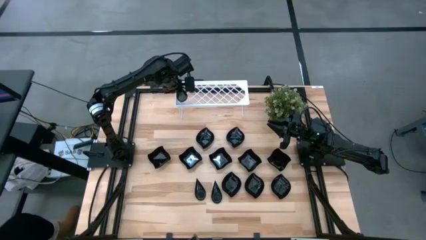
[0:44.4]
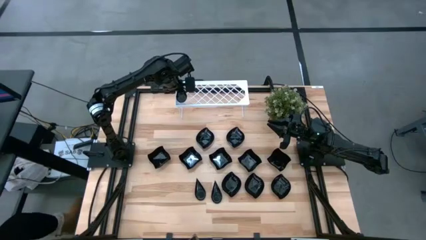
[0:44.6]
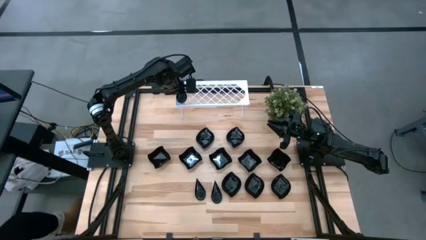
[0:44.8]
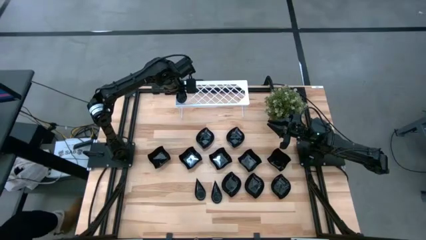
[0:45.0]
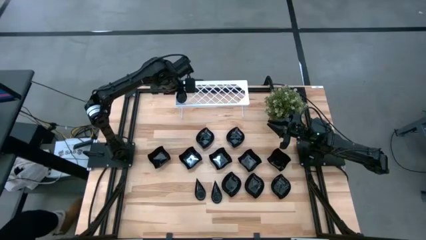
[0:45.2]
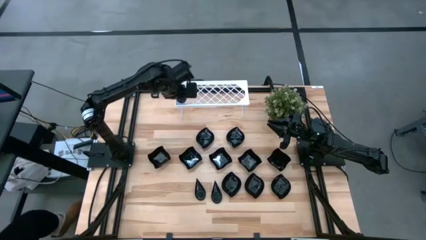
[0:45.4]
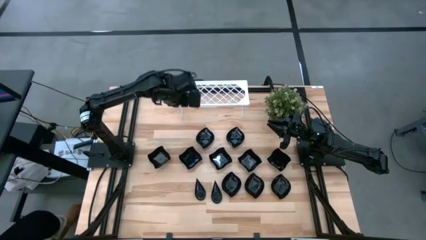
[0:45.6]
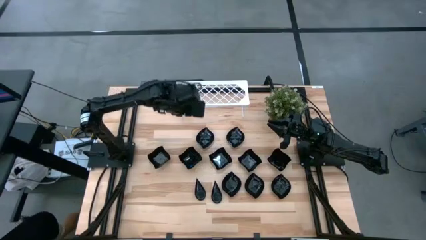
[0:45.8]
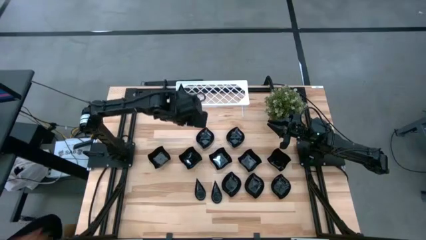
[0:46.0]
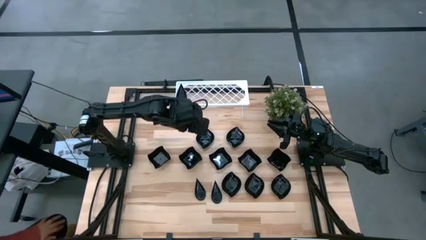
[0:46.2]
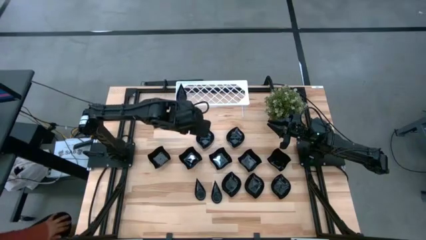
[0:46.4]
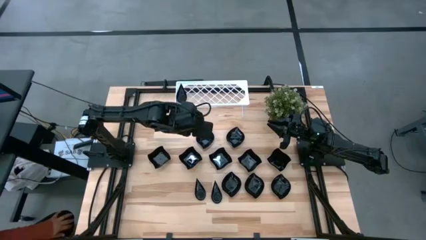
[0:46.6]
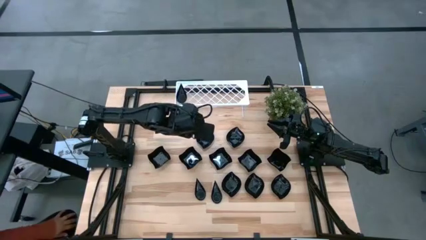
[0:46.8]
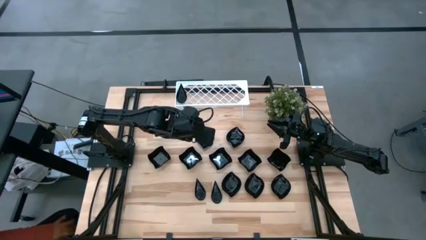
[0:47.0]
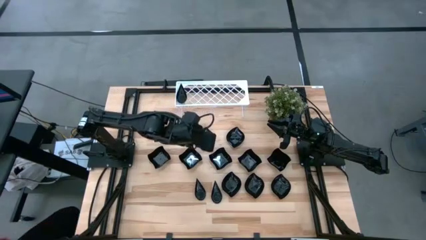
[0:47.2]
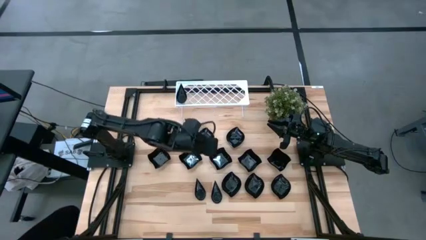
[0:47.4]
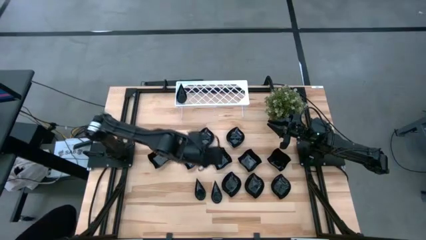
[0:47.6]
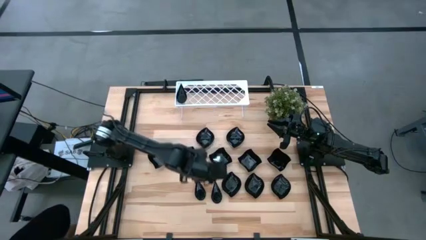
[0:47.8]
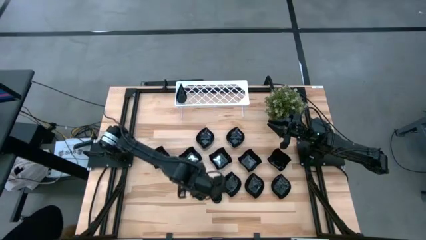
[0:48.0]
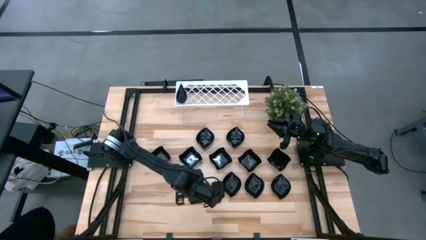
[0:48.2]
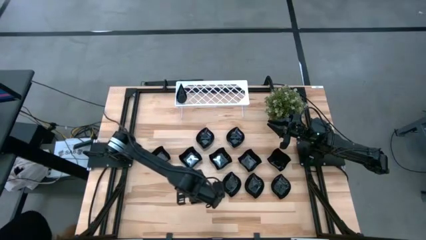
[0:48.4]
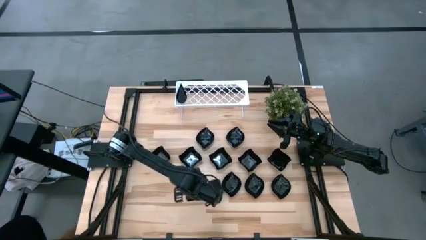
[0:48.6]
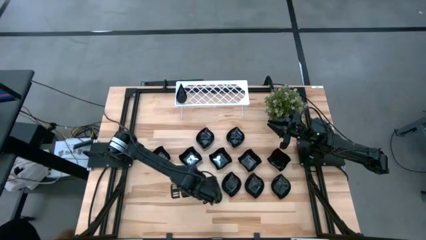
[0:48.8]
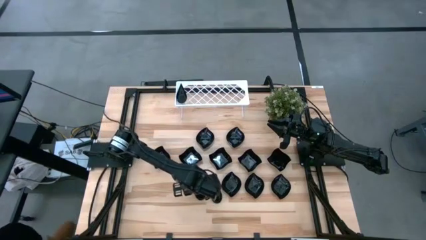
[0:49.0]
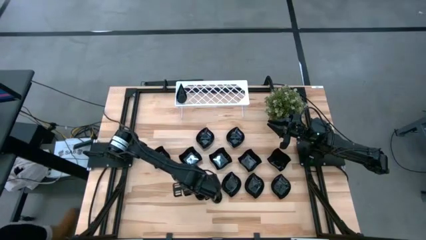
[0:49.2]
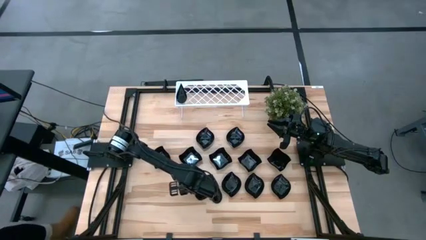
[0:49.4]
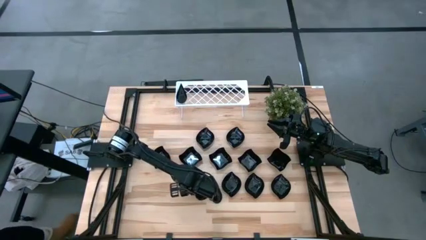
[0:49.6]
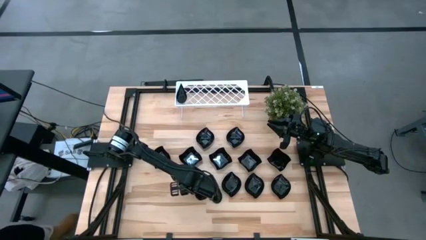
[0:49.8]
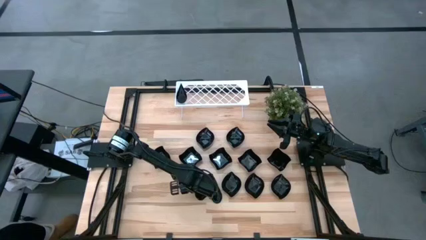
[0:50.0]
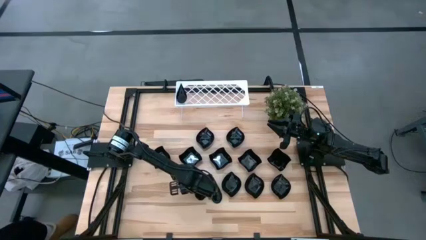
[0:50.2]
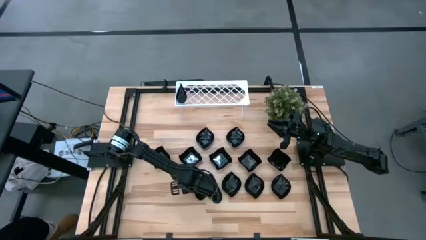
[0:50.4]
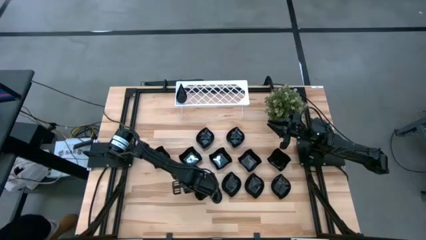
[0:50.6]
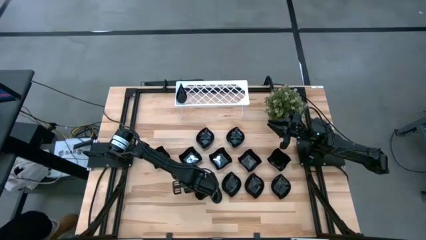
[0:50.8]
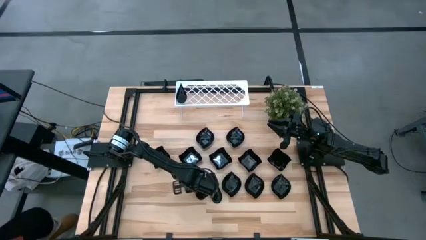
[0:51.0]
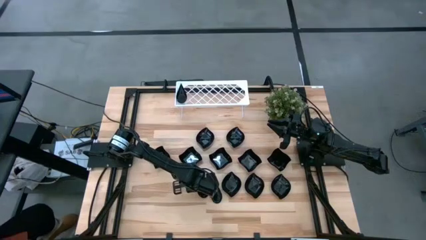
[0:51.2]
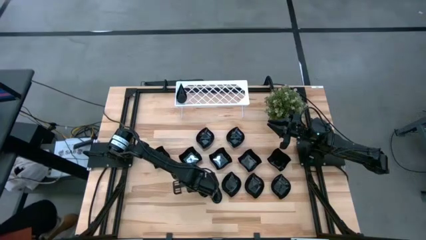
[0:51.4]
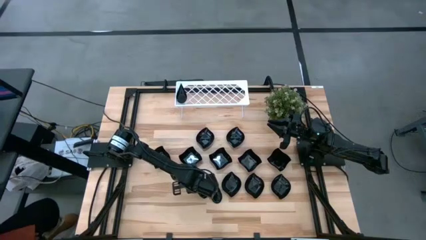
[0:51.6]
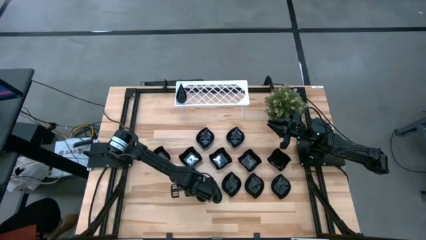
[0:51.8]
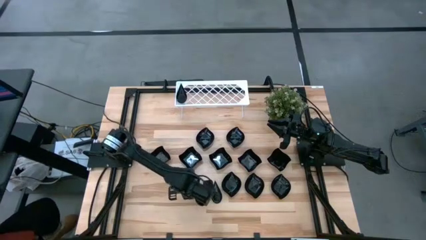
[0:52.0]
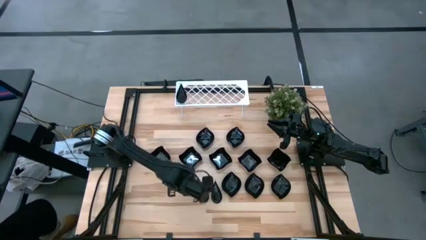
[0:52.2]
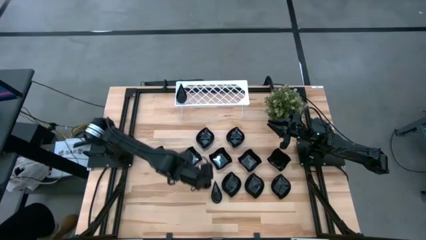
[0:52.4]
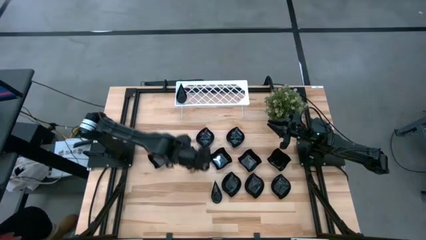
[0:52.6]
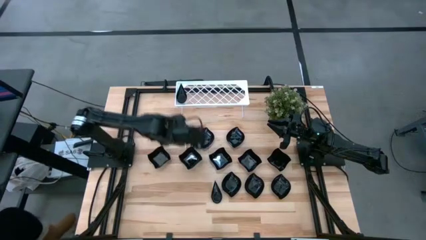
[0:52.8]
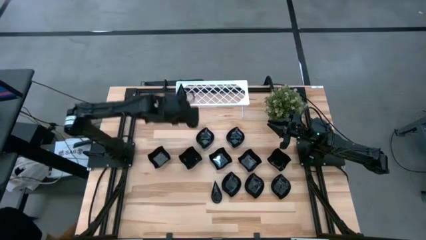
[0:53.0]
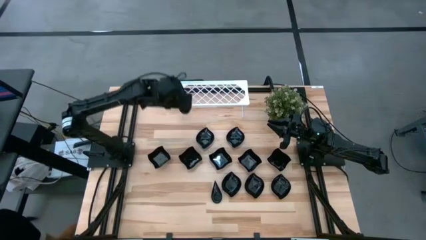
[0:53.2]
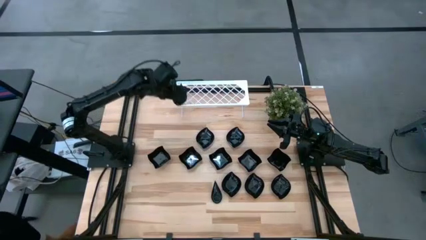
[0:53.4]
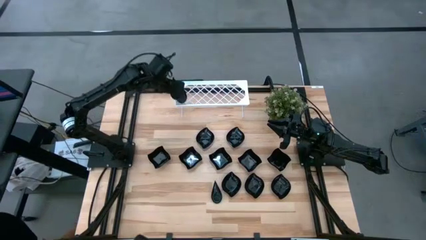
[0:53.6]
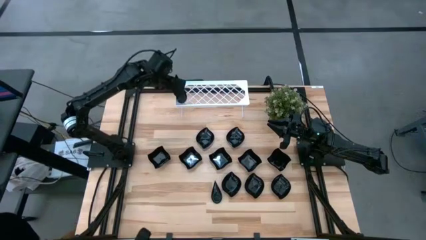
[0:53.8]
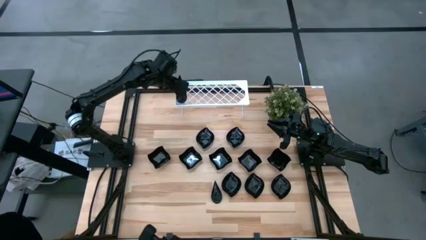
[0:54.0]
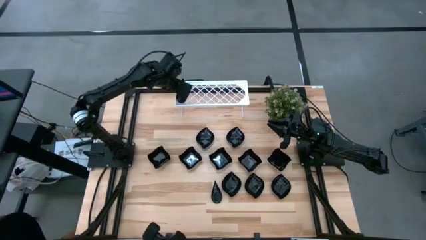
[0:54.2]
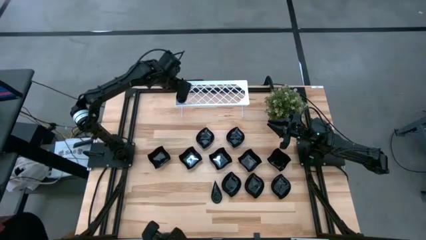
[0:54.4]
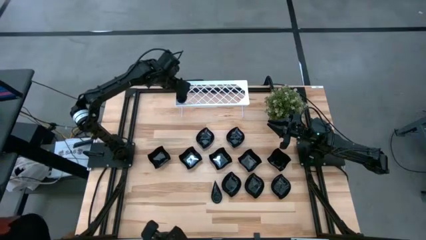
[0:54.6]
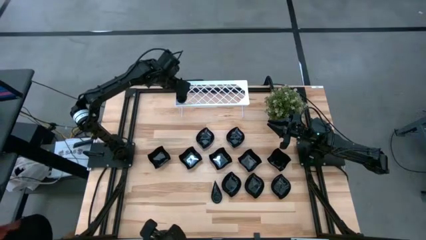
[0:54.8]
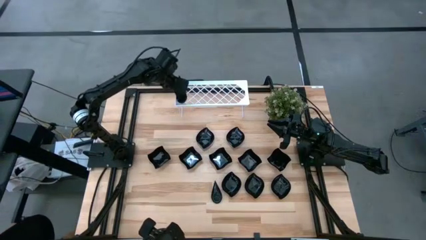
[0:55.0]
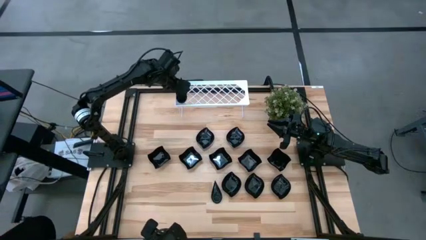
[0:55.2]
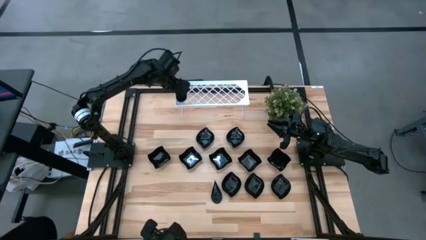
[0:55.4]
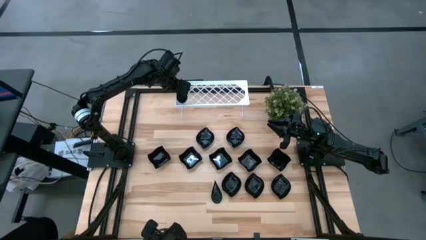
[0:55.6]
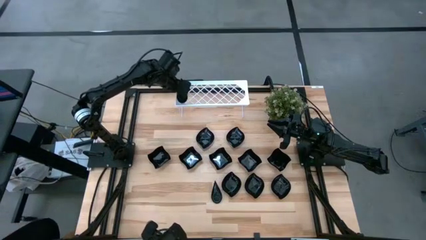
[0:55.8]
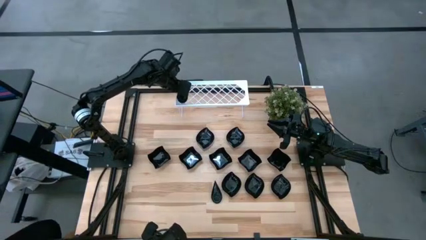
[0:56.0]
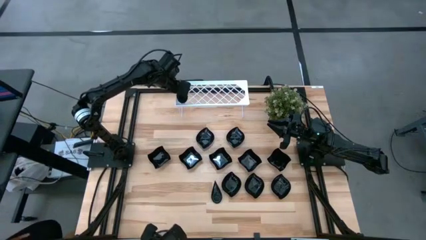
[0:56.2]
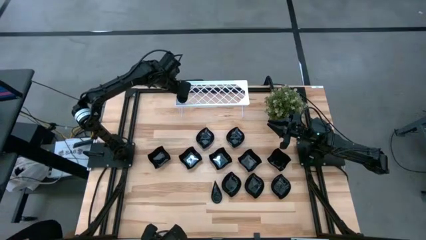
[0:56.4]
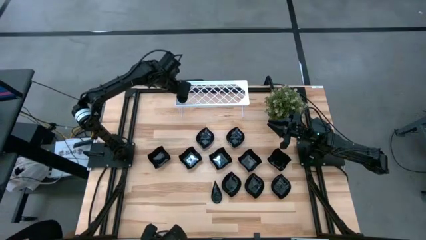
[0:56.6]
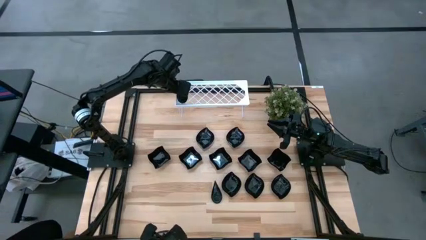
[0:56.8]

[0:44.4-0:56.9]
Task: Pick & Place Mini shaped plates
Stack the drop-shaped plate on top of the drop-shaped plate on the shelf

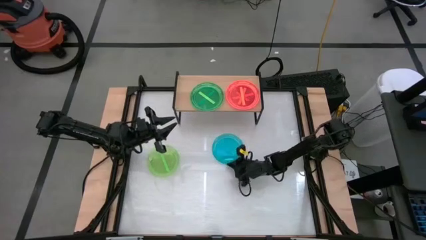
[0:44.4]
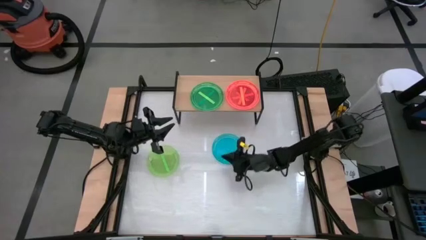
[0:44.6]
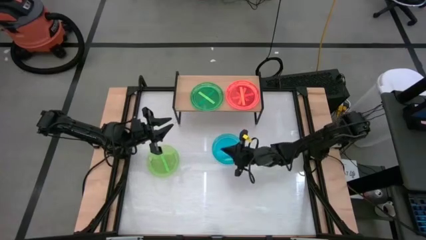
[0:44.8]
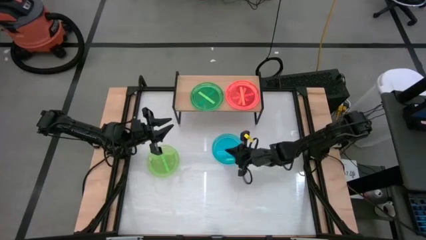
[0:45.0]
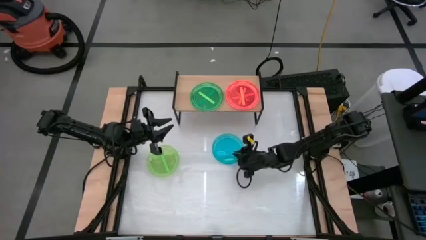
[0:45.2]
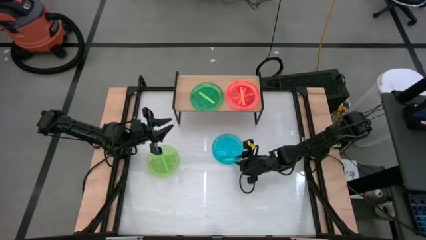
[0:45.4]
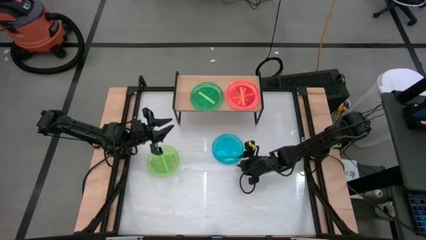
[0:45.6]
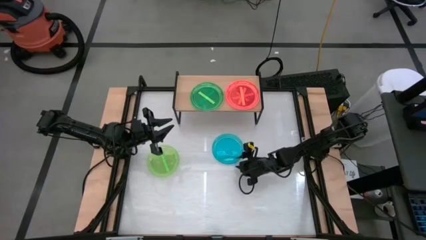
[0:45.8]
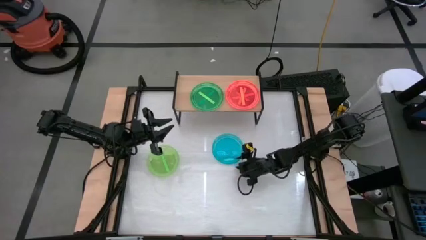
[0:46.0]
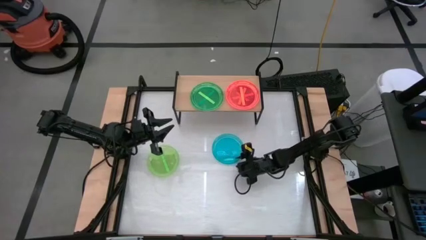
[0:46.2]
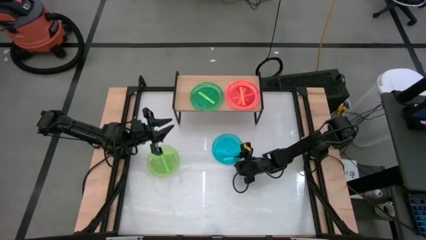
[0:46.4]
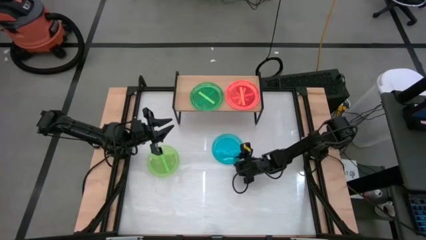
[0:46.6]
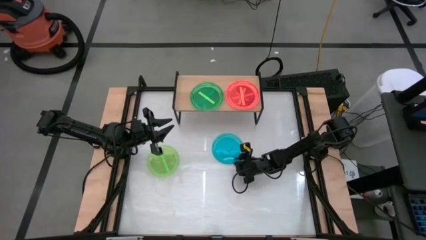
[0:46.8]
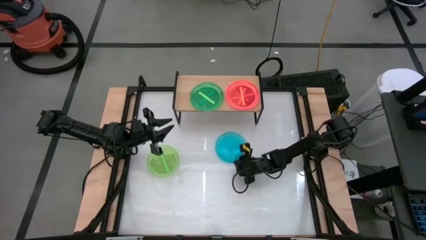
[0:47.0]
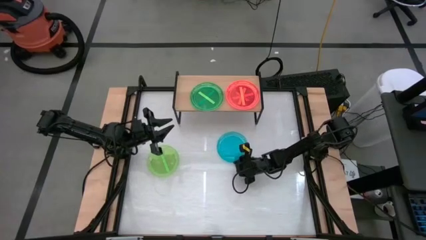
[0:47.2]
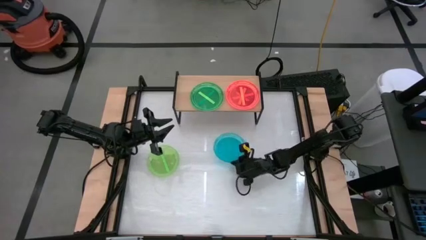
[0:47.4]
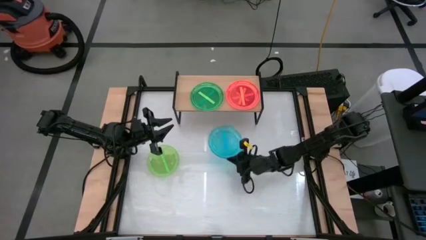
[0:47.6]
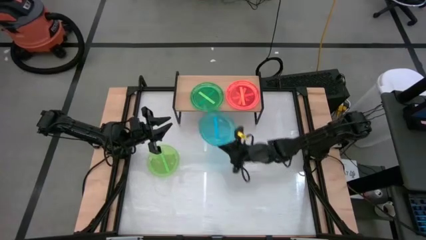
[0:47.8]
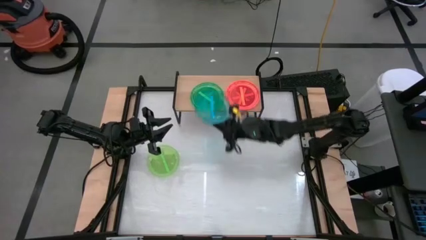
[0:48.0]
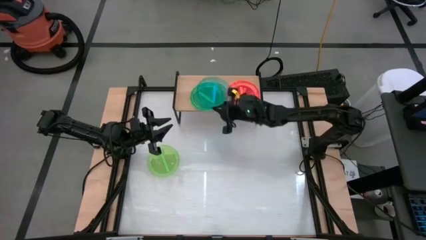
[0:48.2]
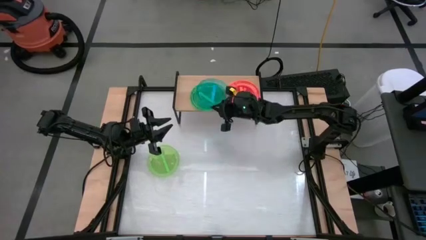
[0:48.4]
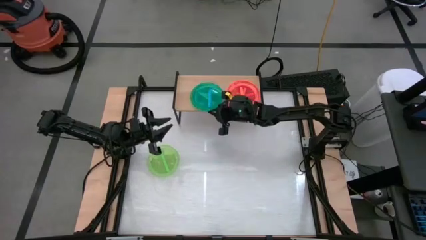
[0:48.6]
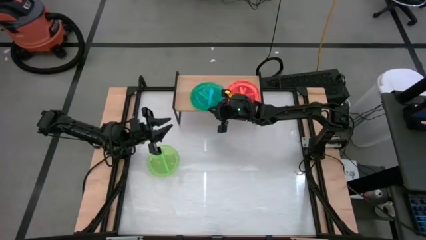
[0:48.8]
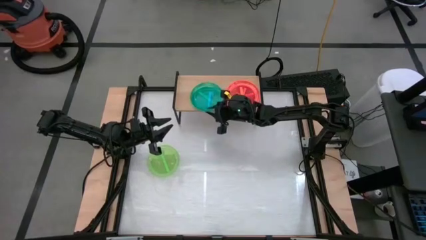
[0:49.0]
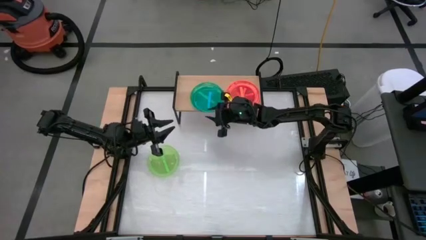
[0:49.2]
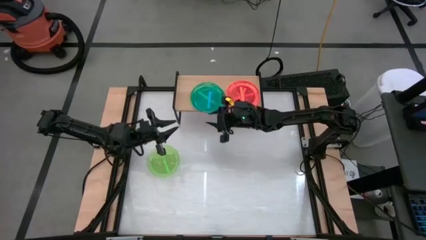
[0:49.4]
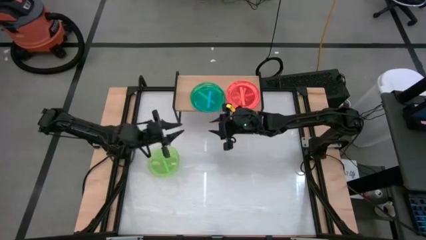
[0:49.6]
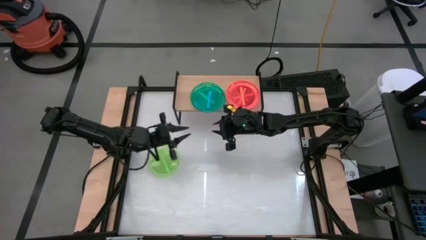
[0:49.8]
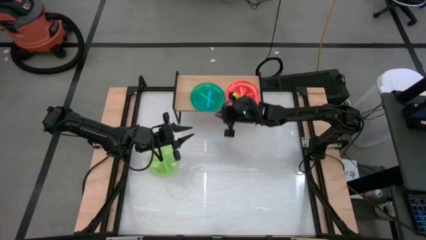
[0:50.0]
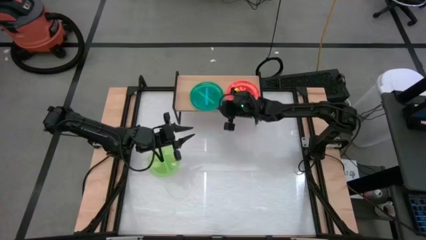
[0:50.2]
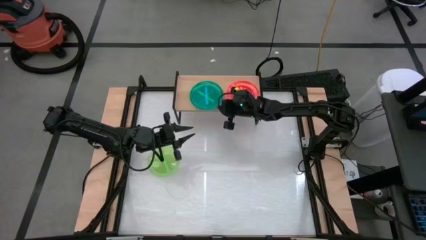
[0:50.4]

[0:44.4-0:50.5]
Task: Place and stack plates onto a shelf
Stack the blue plate on top of the green plate on the shelf
